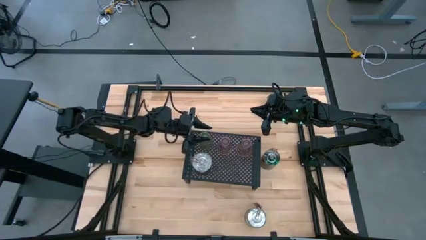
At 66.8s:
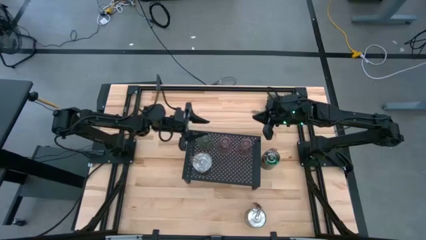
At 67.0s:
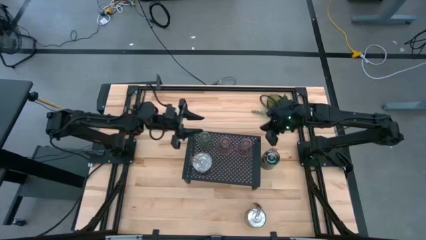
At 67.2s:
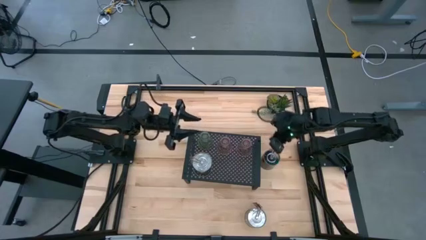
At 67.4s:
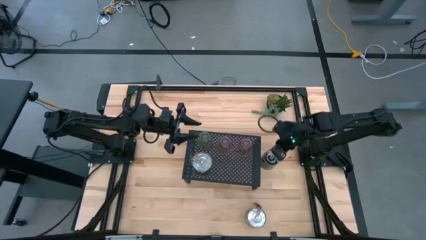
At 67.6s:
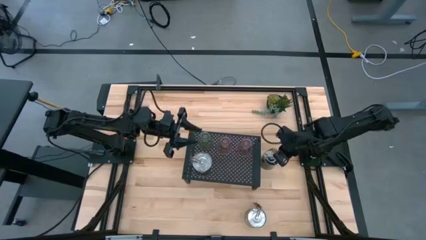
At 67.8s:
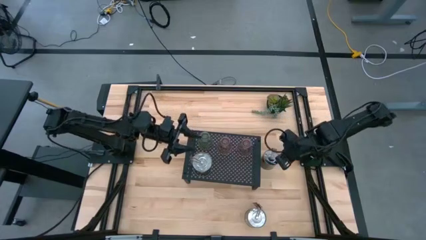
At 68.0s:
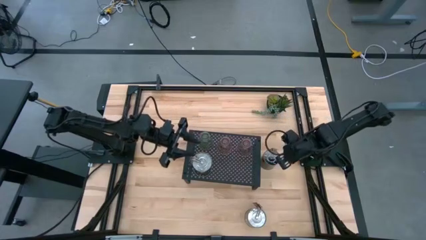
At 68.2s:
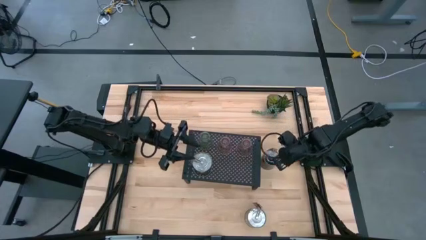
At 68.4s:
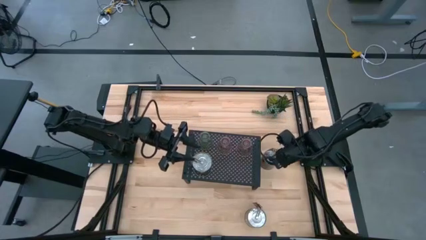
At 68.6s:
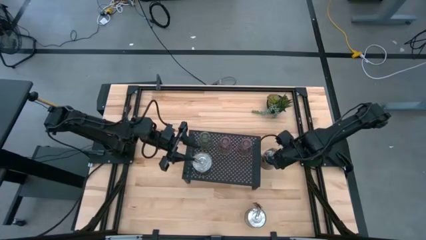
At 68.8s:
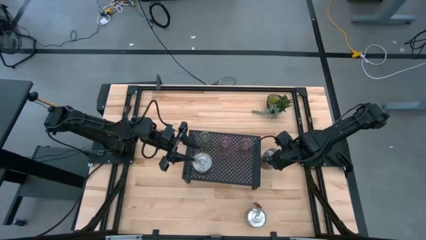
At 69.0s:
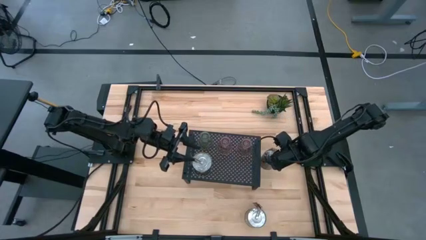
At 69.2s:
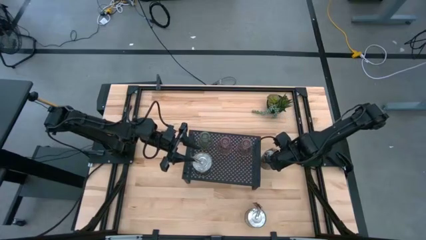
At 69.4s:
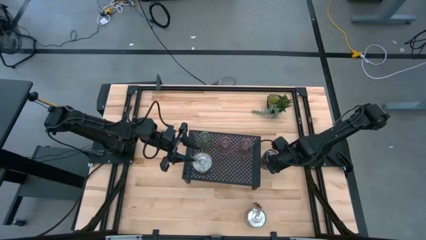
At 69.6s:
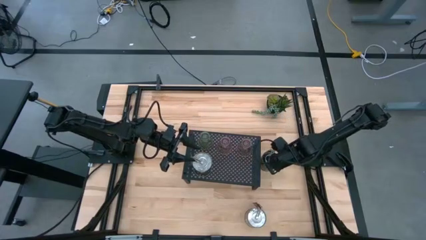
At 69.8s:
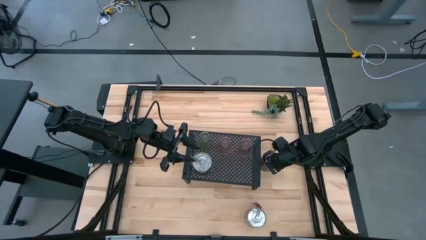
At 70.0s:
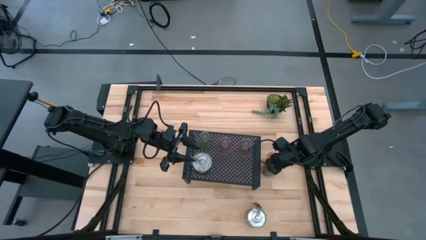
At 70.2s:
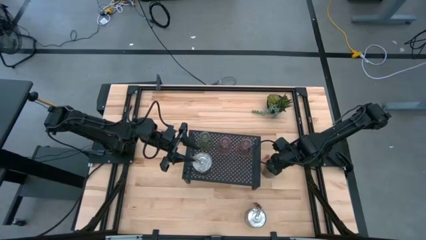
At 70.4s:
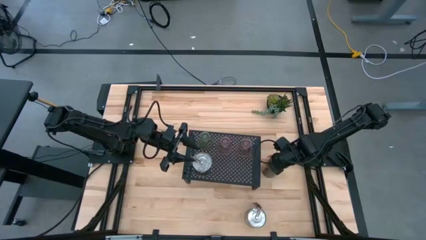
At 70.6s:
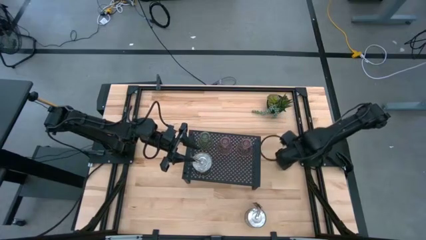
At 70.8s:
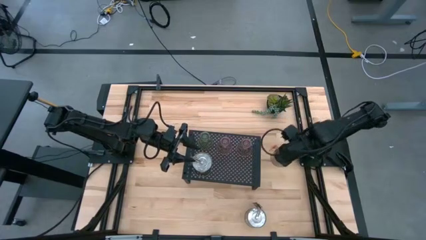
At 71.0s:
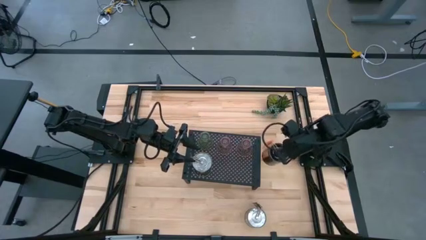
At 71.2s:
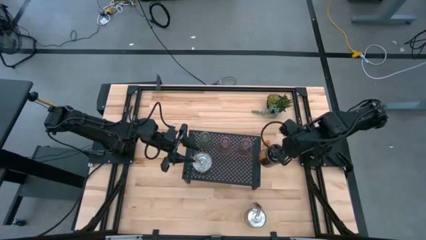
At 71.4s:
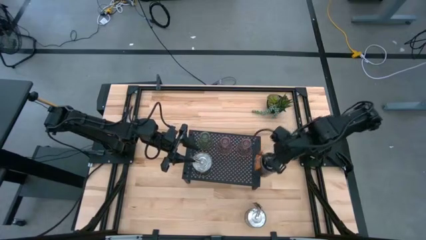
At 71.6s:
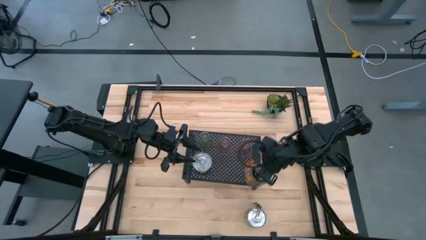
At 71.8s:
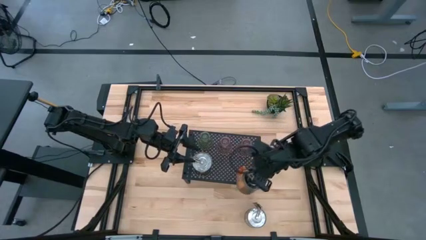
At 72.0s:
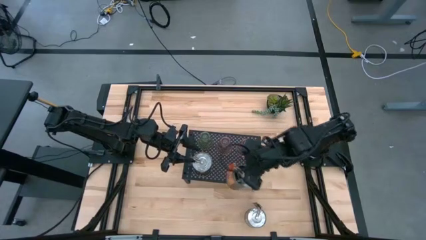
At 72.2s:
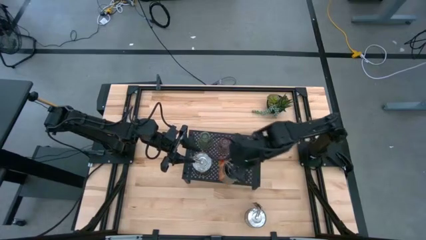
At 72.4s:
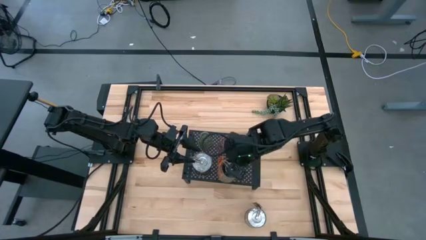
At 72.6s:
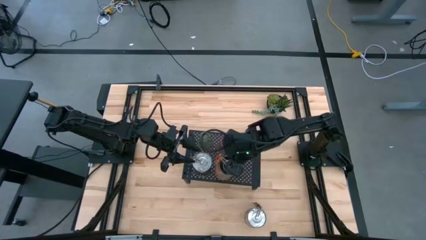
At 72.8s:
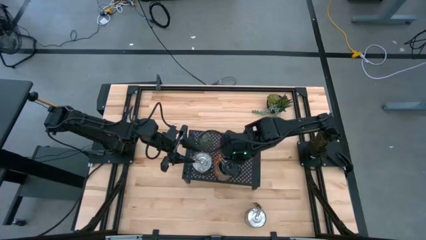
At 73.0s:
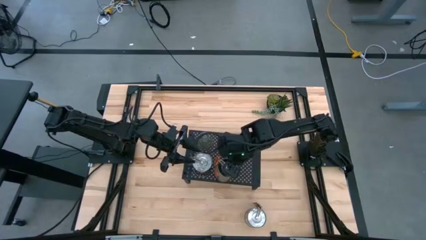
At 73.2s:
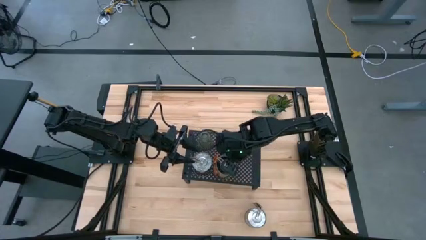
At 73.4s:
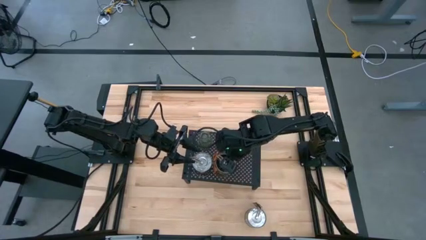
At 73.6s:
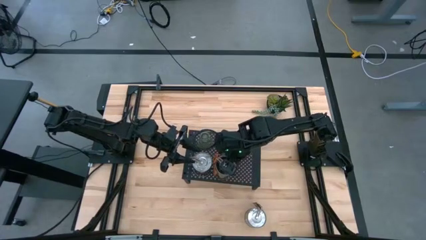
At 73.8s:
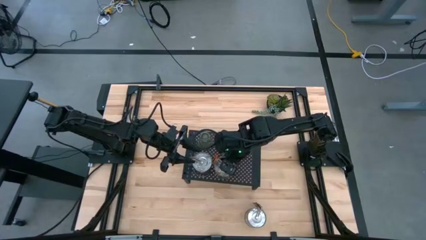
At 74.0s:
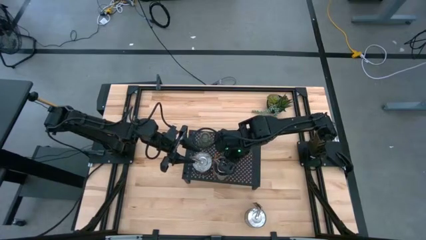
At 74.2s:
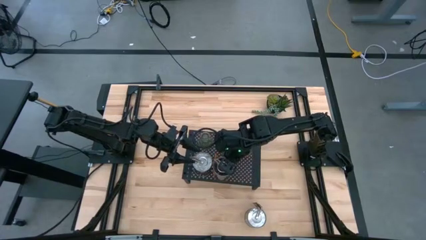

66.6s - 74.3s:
Task: Pick & Place candle stick holders
Put the orange scented candle on the shelf

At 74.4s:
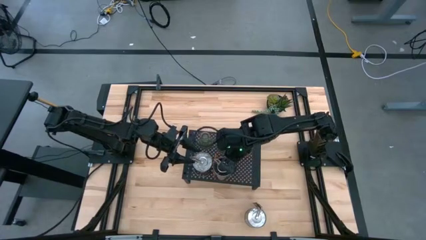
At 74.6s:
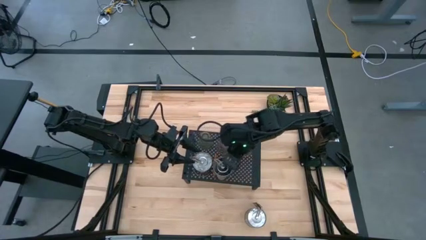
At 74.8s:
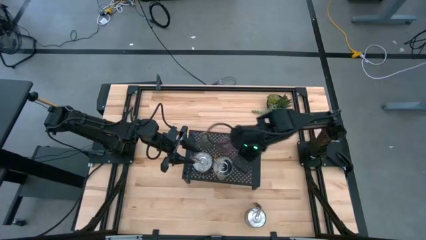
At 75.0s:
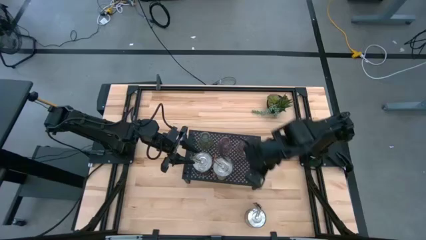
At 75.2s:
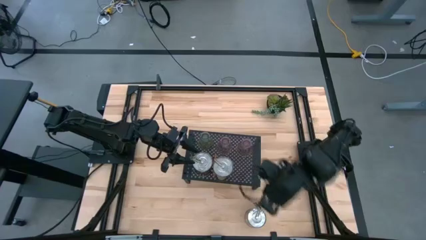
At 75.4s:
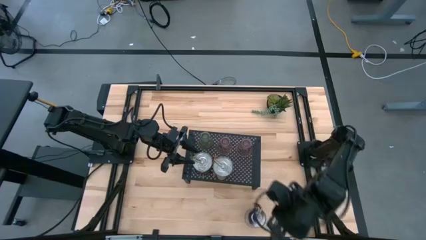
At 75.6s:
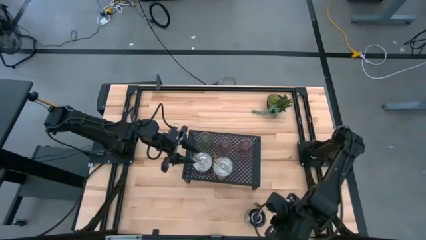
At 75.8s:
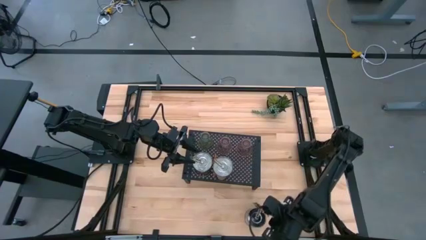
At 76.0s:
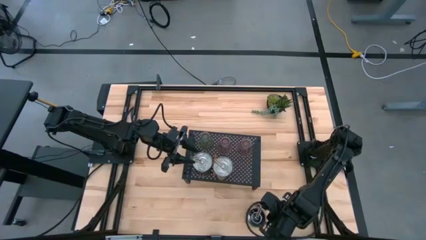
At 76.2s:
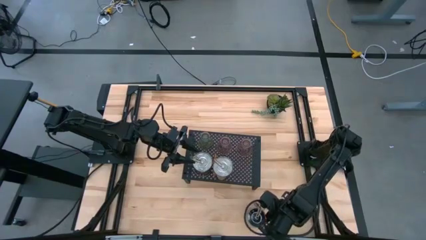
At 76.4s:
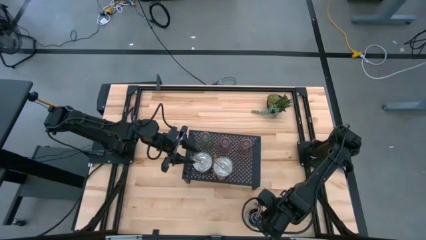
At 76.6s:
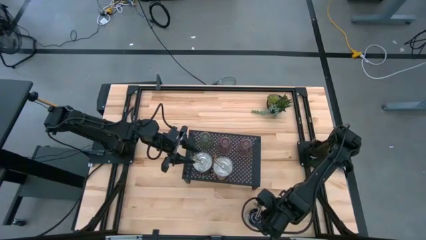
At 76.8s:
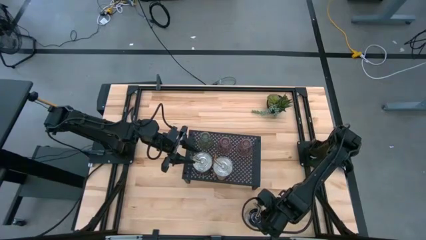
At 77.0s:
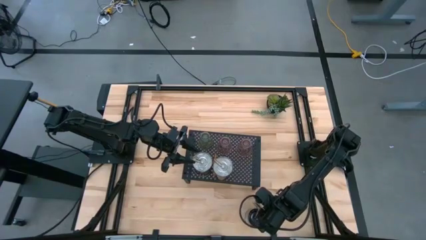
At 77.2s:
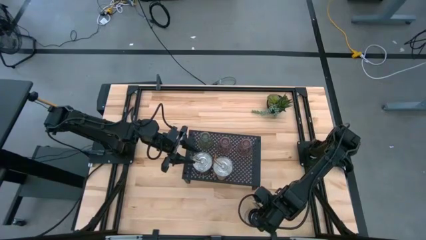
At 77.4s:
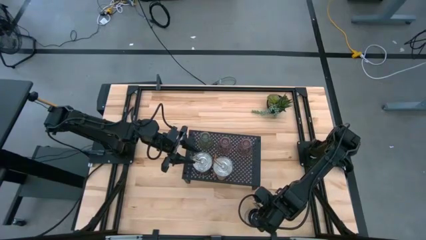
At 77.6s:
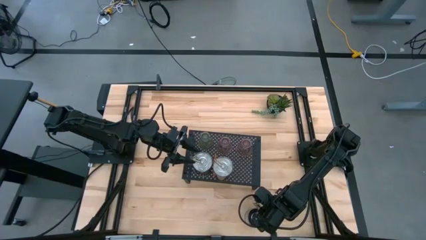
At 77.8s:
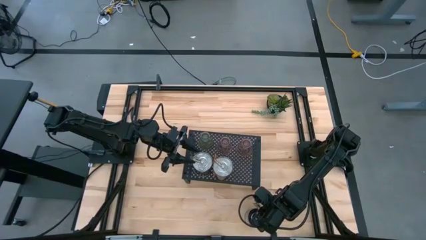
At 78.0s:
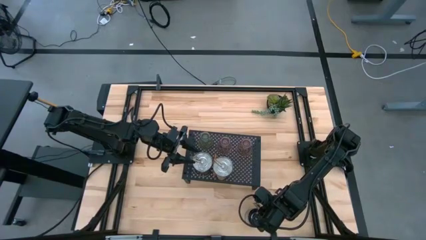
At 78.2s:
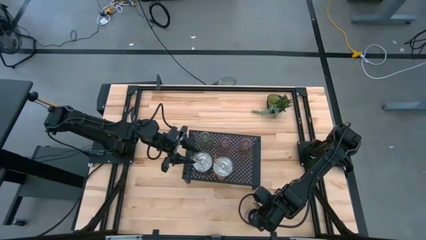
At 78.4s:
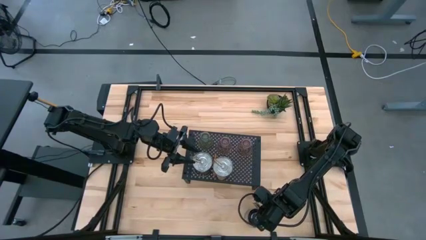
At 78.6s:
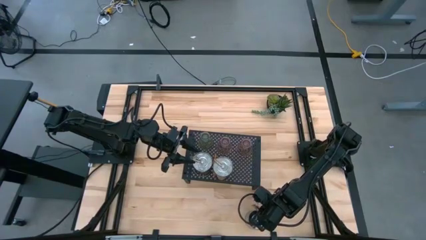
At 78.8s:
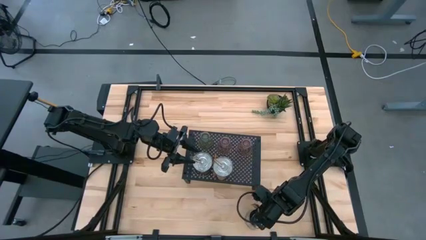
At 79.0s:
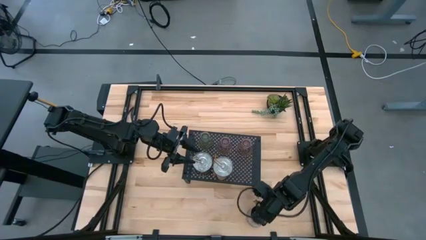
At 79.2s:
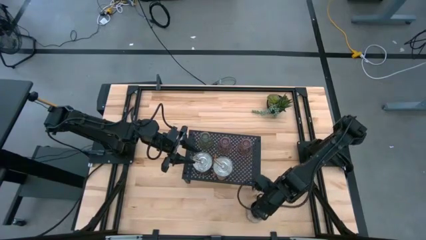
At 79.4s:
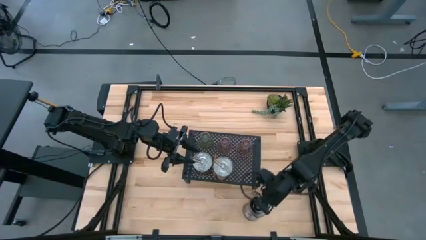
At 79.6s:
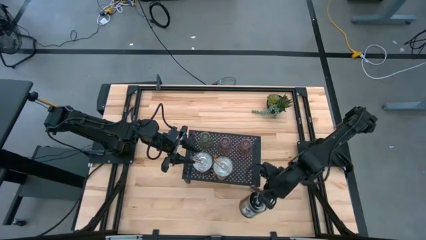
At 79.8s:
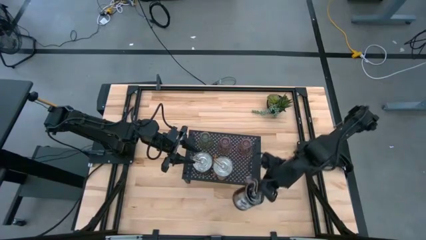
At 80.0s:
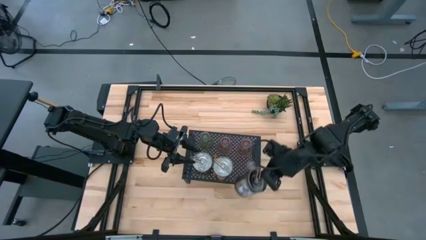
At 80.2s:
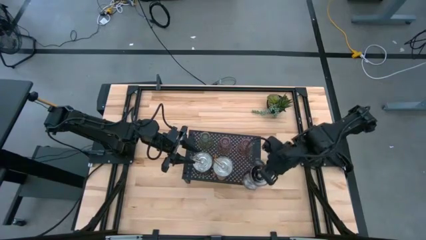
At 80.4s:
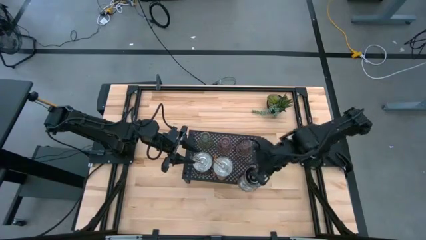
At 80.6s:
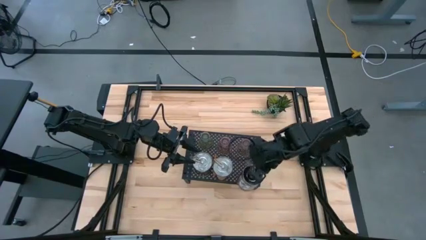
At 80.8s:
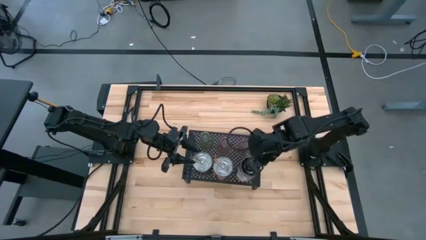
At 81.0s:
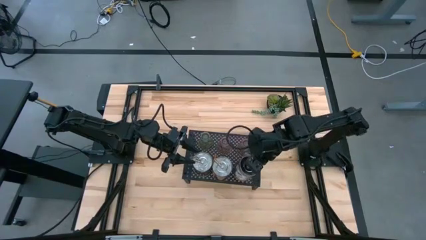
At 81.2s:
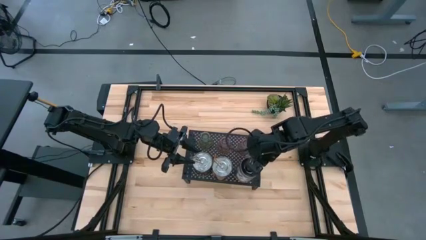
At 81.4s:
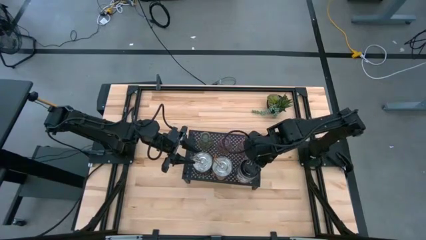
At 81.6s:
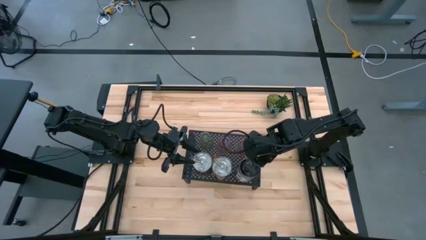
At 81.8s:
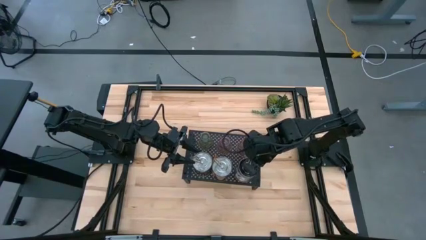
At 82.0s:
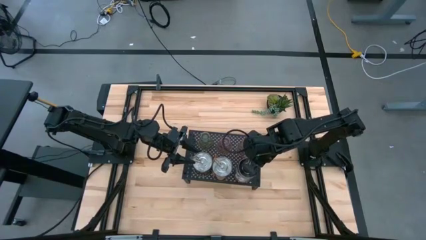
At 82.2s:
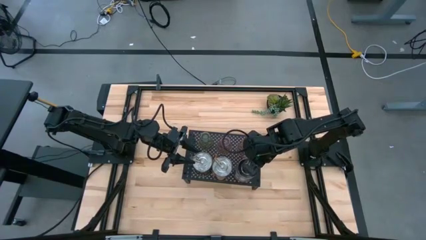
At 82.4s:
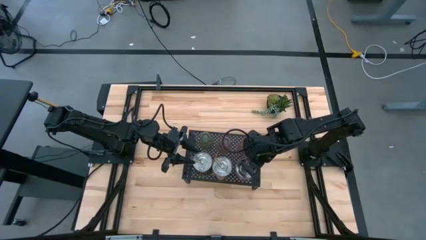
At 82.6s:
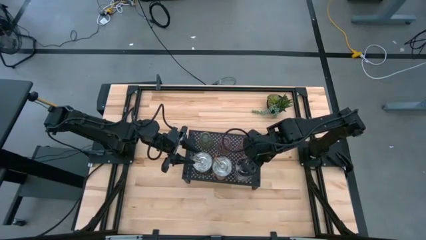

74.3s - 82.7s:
Put the brown scented candle on the shelf

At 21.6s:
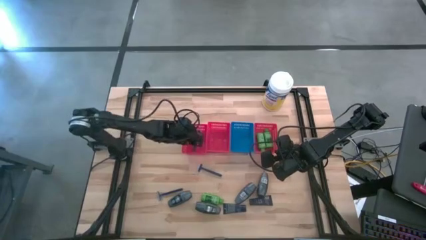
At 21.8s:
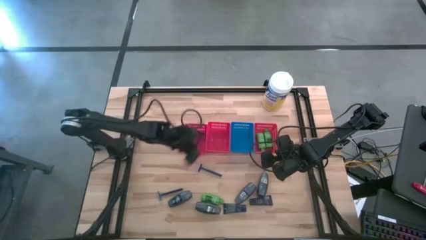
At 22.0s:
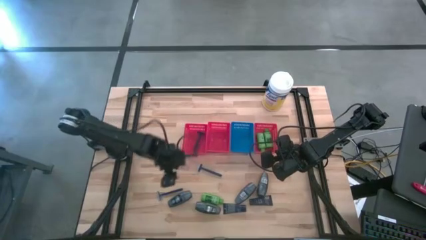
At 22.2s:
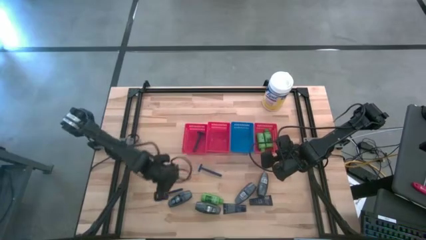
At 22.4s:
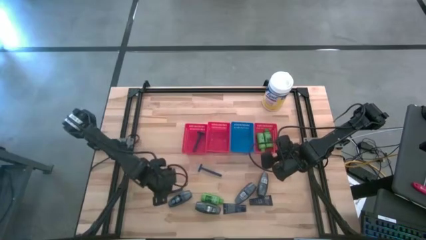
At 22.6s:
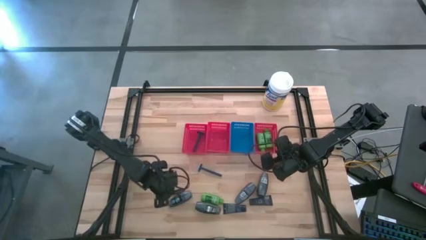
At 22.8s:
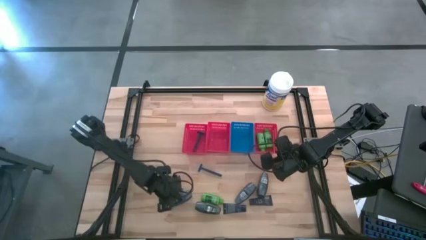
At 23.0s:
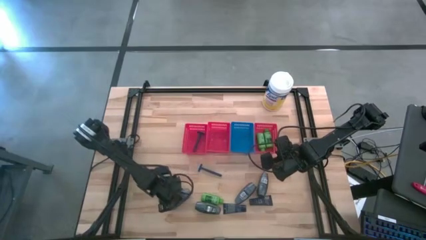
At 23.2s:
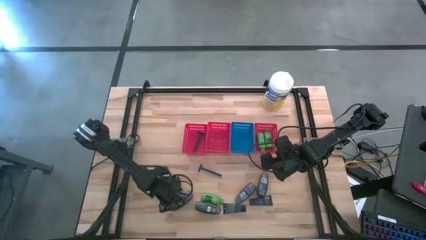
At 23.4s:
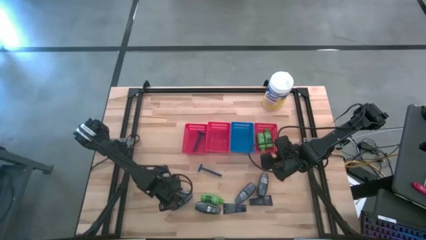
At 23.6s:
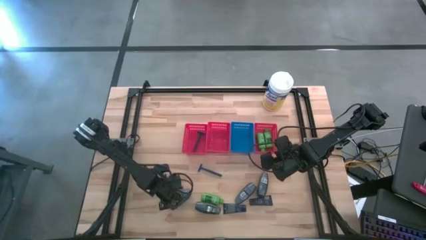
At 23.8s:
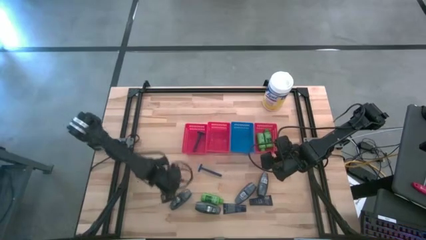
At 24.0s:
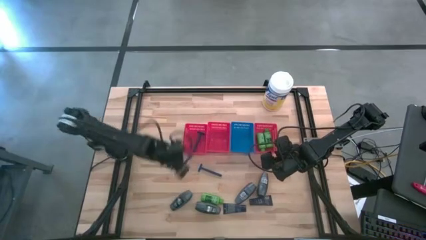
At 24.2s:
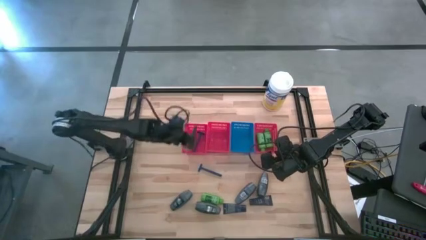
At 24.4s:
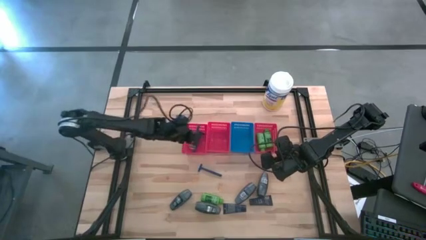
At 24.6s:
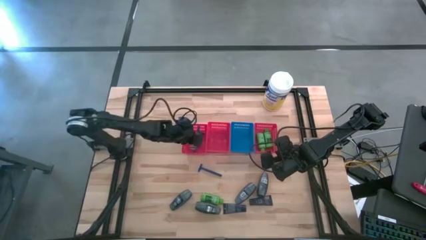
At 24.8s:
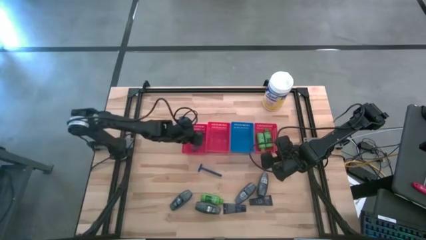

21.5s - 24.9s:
Task: Pick & Place Travel size toiletries
Put the blue razor into the left red bin
